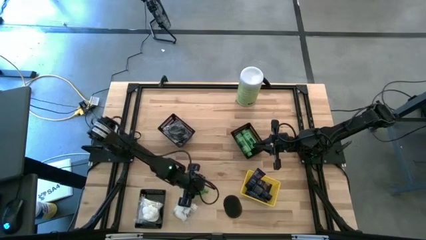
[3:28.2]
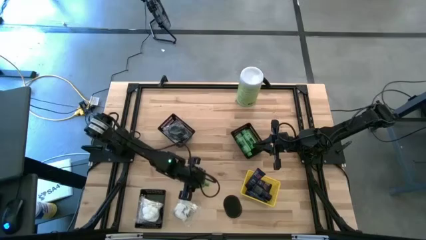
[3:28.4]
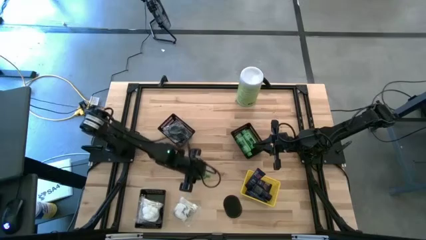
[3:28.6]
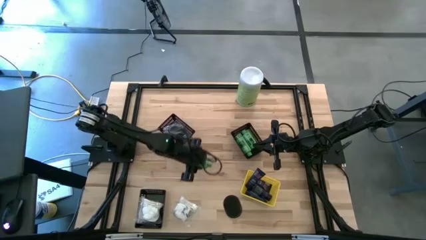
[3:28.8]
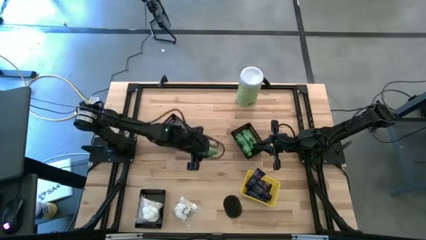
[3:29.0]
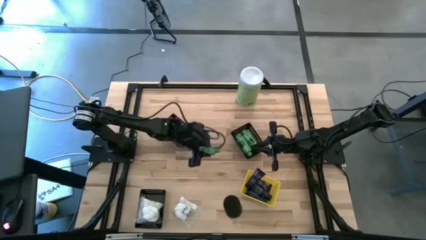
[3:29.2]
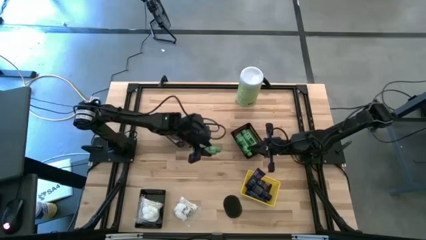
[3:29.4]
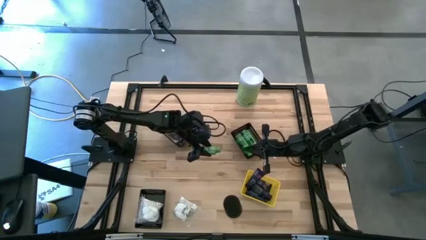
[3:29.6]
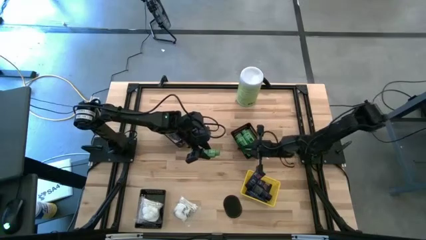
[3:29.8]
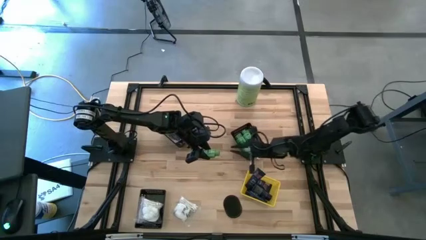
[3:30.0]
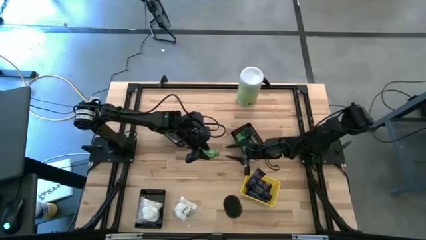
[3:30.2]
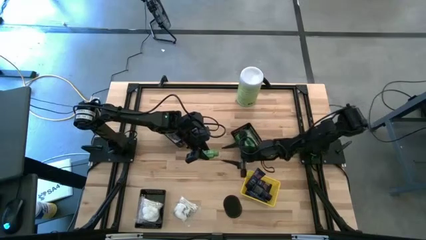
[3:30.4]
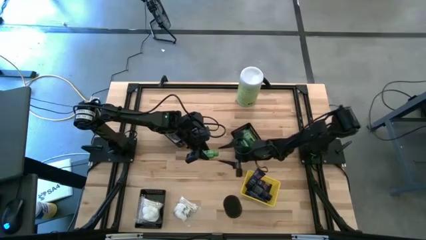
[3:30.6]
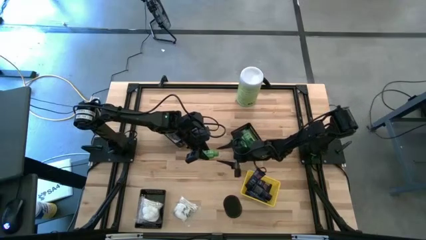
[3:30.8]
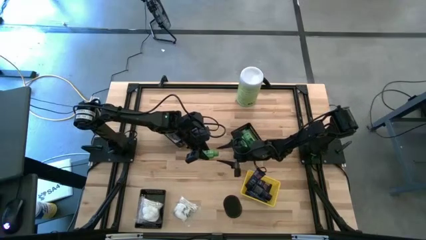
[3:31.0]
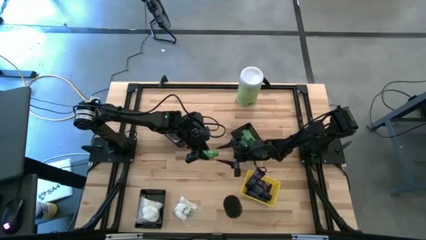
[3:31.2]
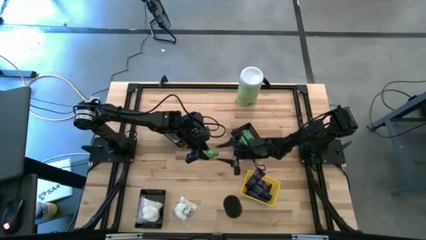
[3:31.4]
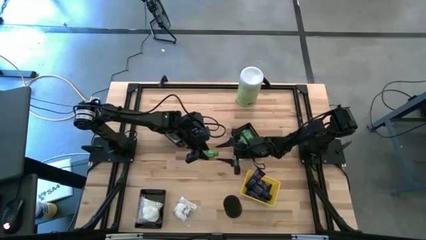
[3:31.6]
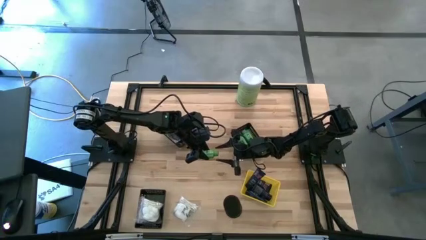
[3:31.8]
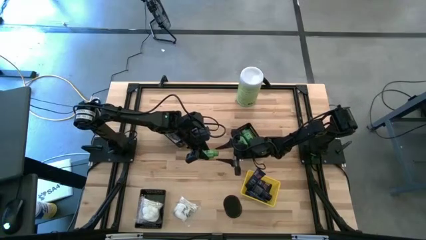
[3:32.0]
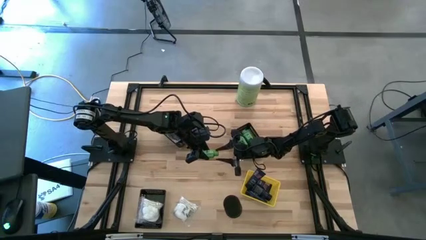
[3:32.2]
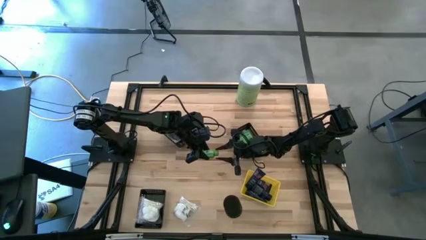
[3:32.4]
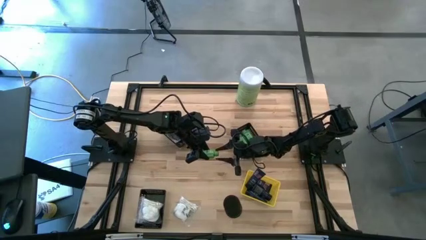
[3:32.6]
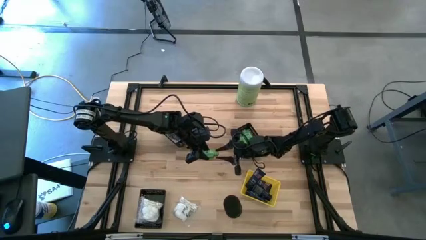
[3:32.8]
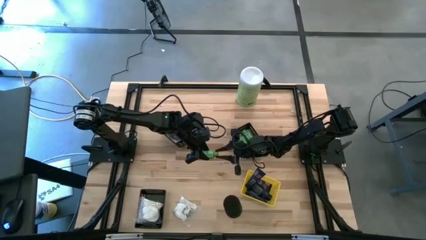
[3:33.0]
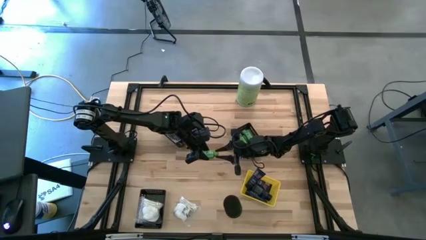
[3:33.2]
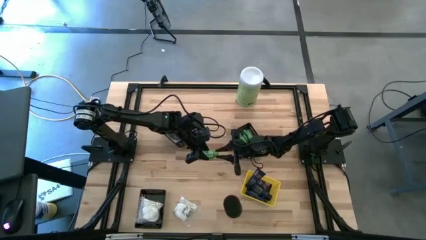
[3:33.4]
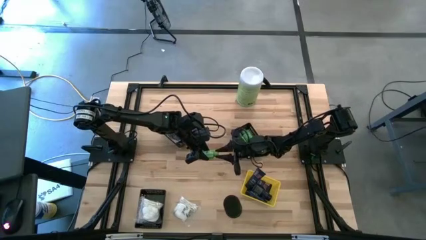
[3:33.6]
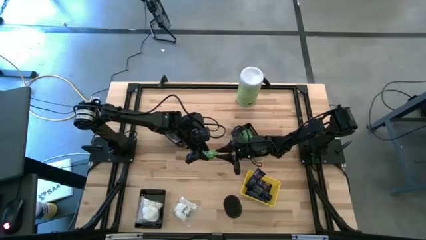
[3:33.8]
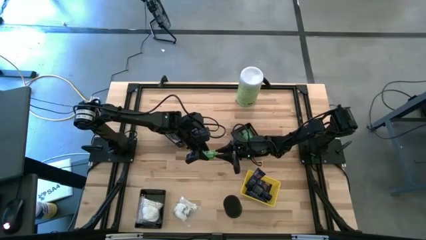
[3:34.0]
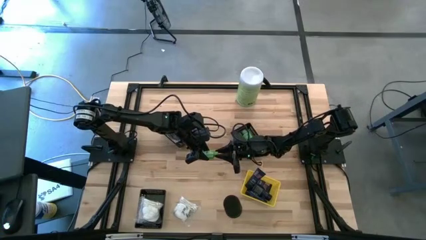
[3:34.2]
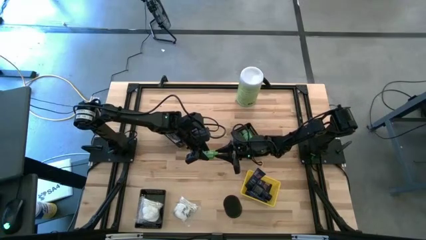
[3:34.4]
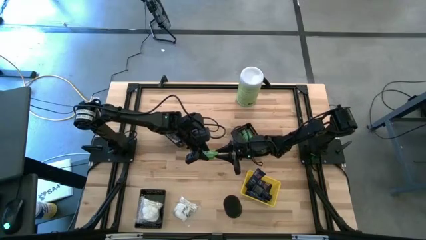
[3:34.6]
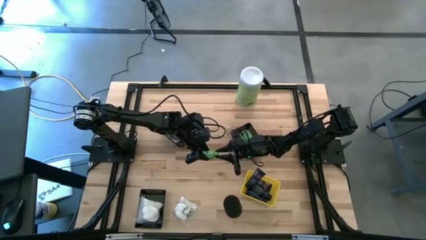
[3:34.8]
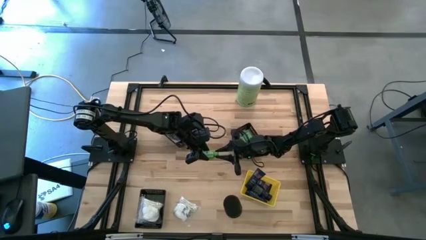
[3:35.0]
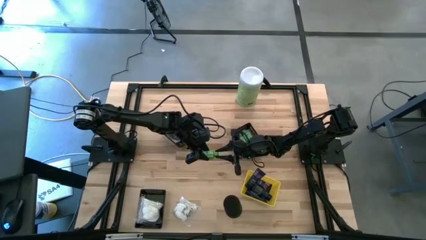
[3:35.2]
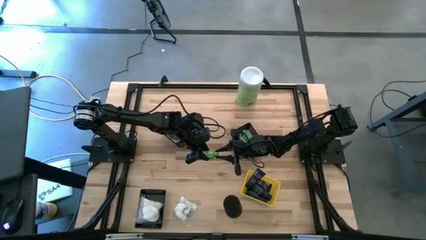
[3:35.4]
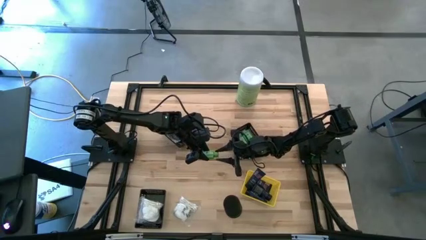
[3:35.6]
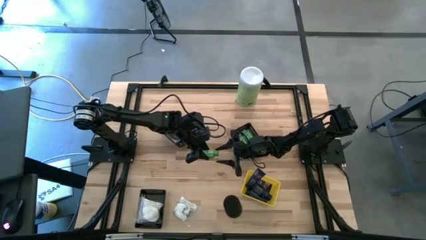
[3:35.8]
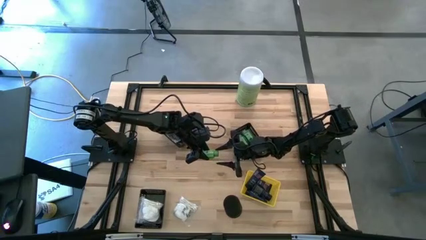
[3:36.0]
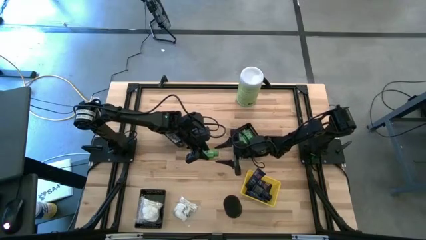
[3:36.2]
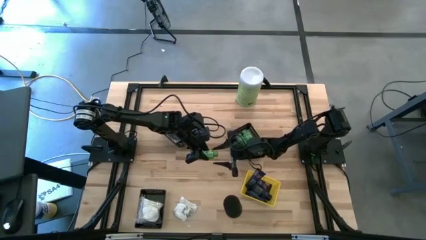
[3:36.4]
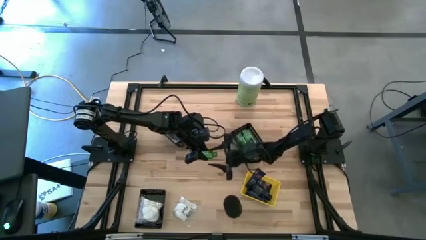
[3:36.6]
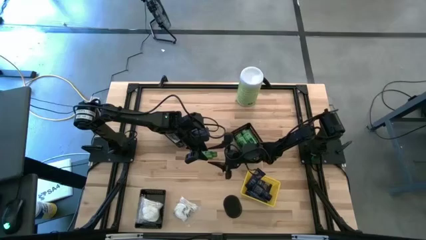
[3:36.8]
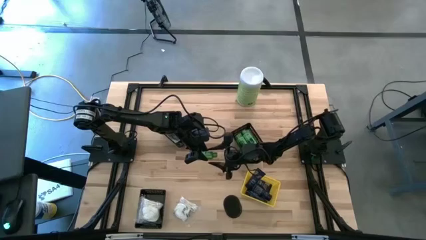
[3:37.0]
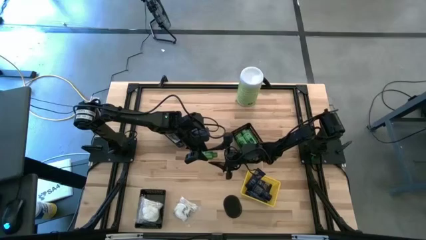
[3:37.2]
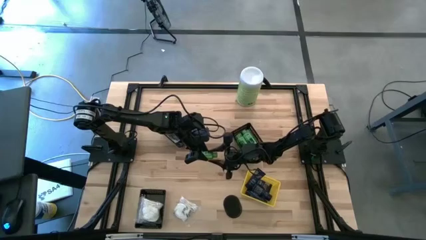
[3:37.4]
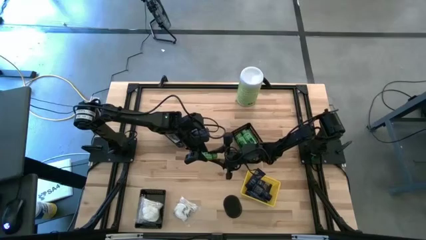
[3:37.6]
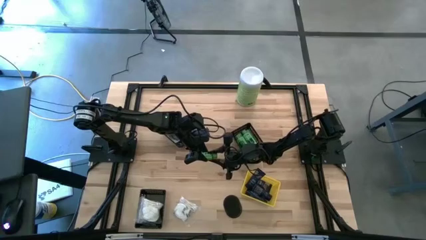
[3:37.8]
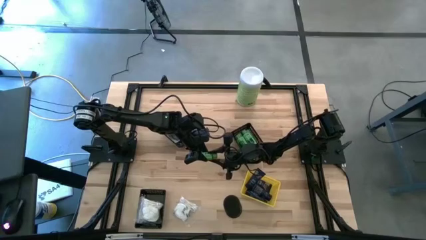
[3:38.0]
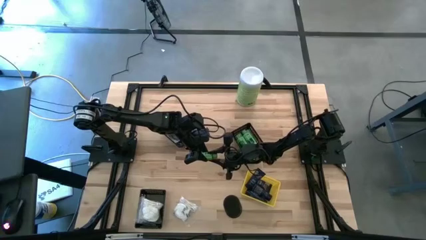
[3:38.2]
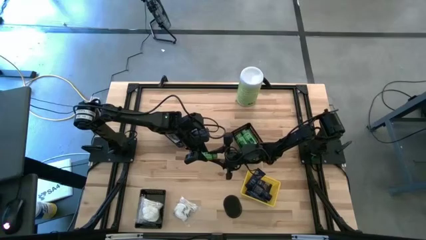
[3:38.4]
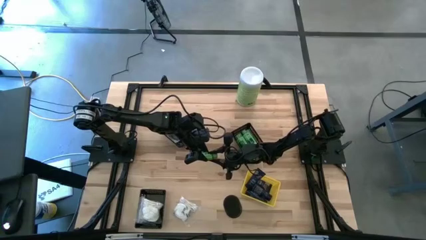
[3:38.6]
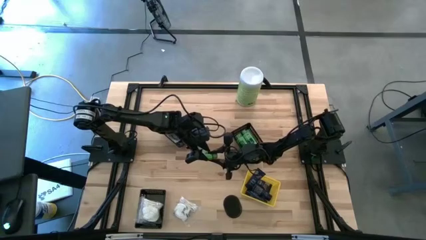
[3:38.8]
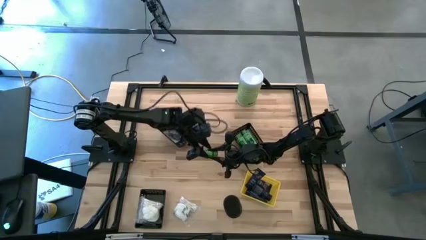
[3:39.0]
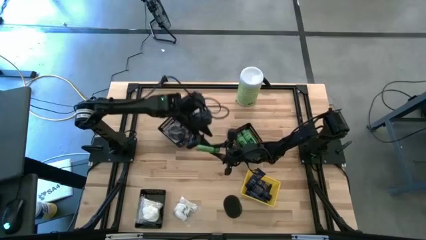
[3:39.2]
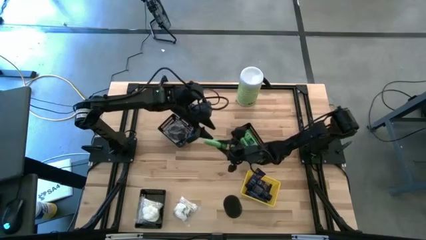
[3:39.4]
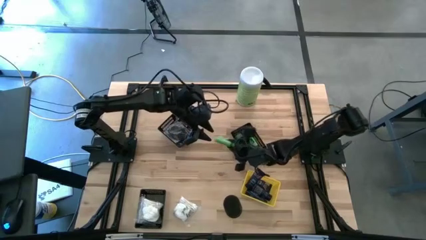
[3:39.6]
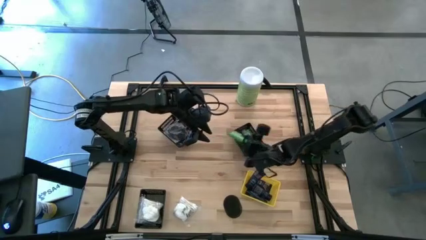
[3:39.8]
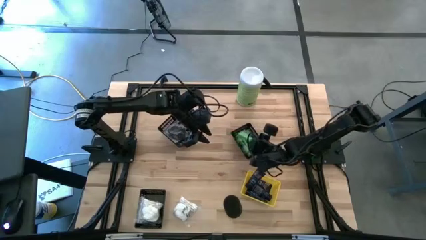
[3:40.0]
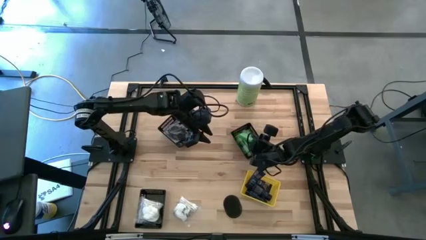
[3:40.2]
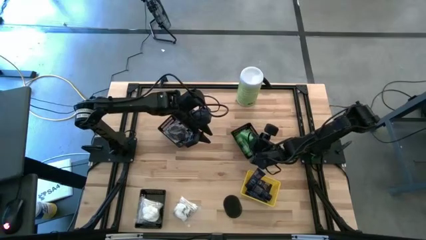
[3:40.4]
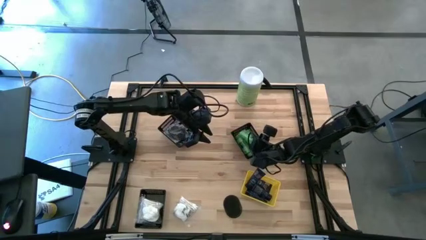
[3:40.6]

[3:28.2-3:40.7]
Task: Pick & Place Travel size toiletries
Put the shampoo bottle into the top right black bin

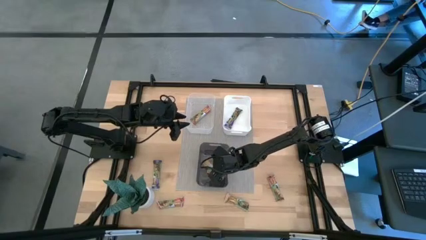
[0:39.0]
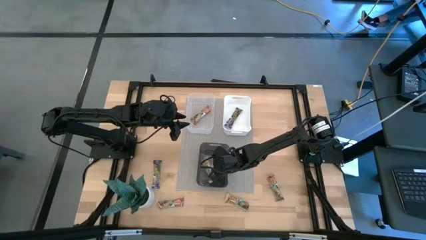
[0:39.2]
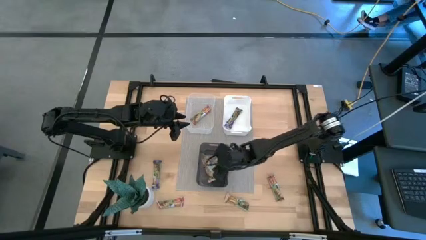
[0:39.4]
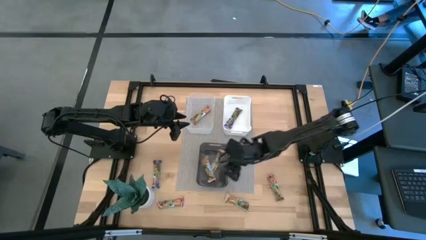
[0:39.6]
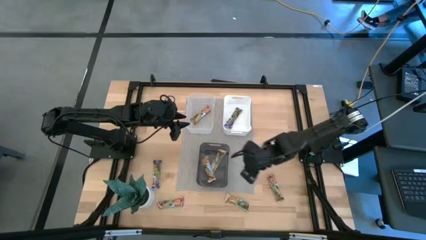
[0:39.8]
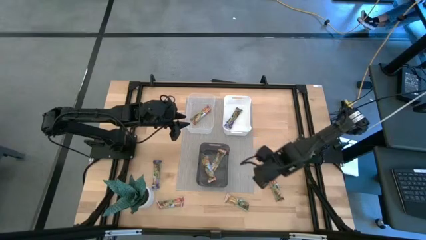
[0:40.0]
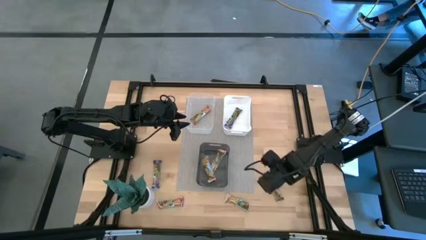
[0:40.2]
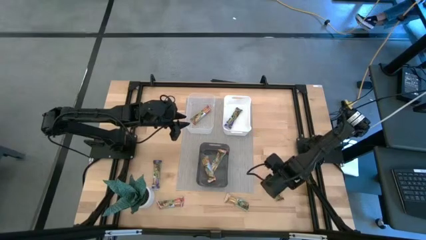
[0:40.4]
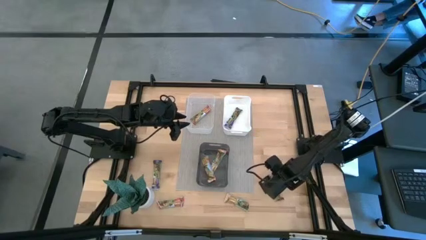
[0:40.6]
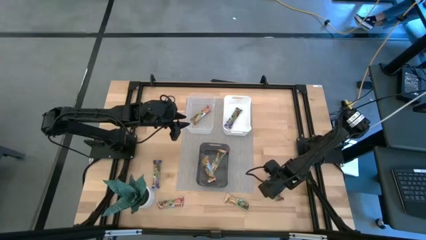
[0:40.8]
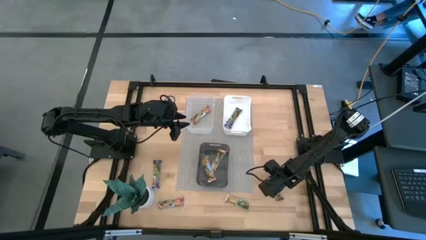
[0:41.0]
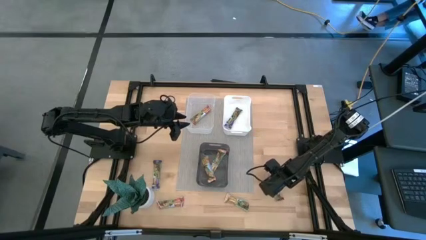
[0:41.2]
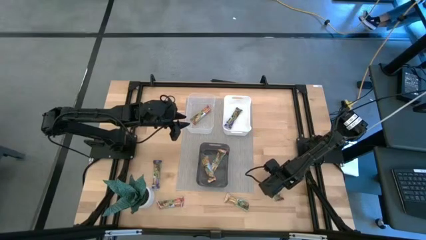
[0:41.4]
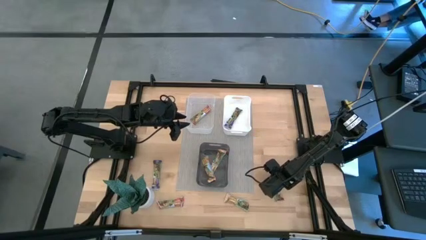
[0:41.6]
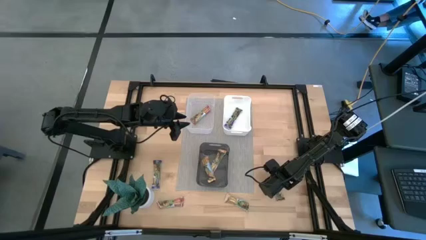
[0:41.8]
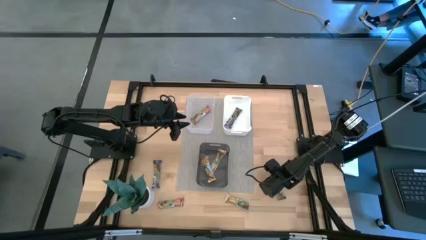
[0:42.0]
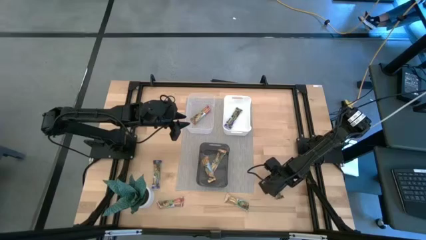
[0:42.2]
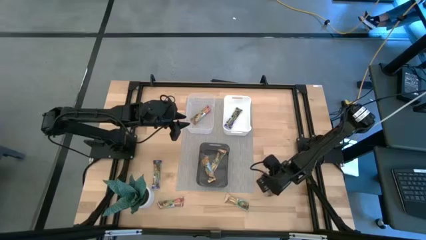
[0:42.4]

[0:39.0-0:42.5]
Task: Pick and place Granola Bars by type
Put the right red granola bar into the transparent bin
